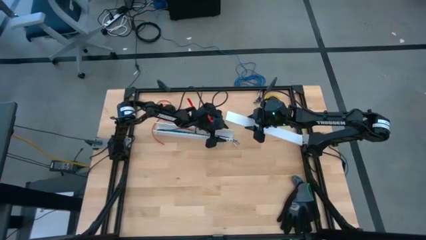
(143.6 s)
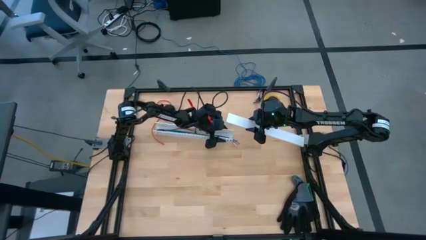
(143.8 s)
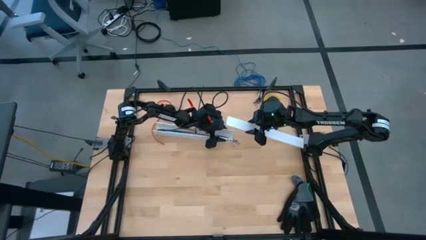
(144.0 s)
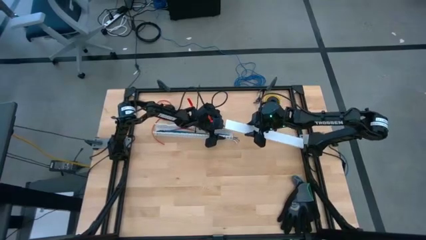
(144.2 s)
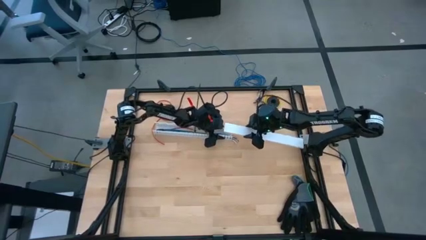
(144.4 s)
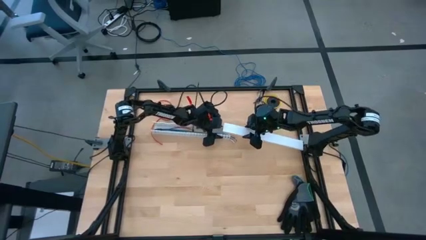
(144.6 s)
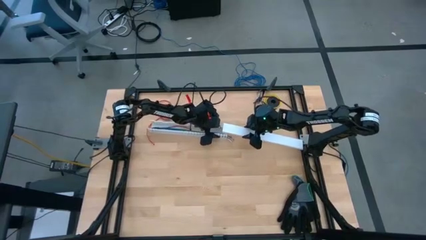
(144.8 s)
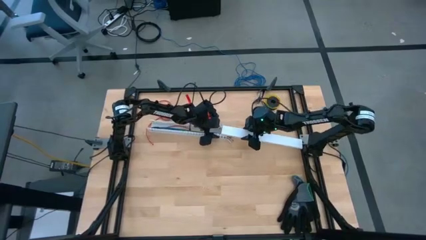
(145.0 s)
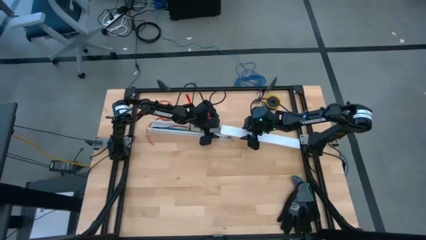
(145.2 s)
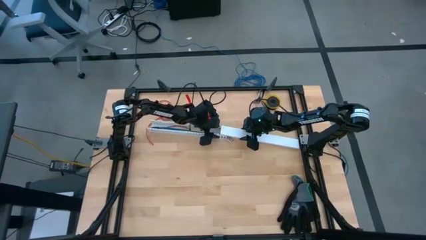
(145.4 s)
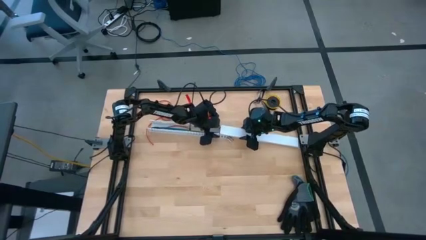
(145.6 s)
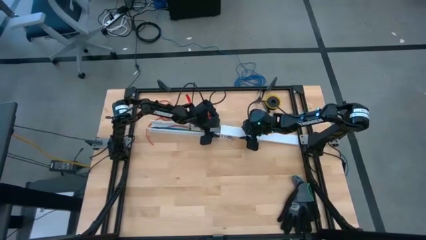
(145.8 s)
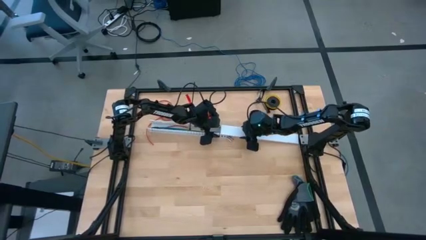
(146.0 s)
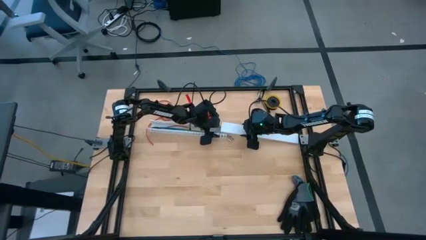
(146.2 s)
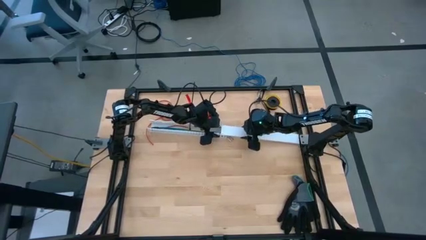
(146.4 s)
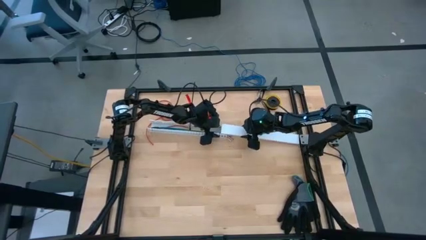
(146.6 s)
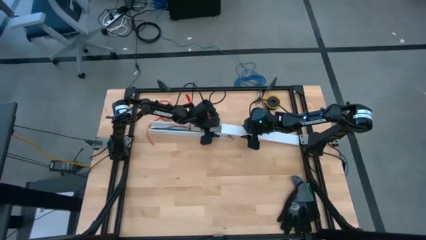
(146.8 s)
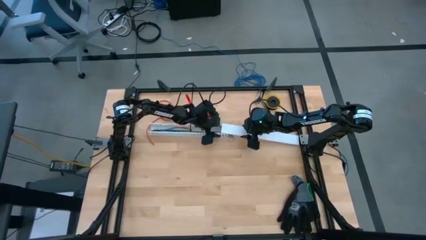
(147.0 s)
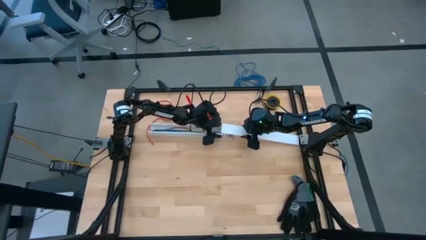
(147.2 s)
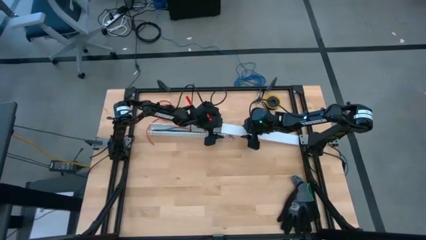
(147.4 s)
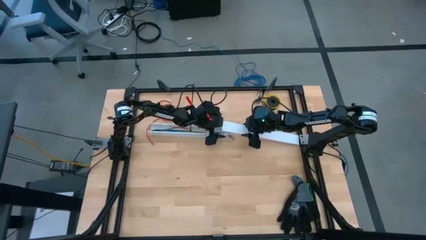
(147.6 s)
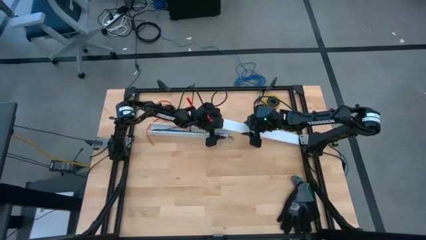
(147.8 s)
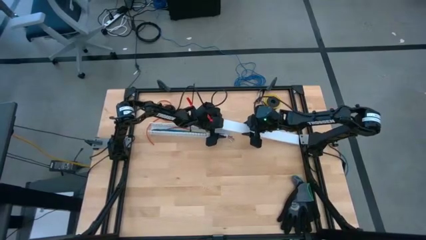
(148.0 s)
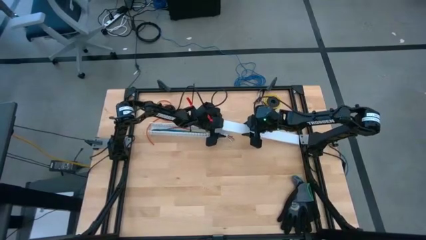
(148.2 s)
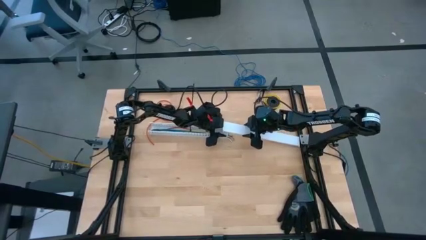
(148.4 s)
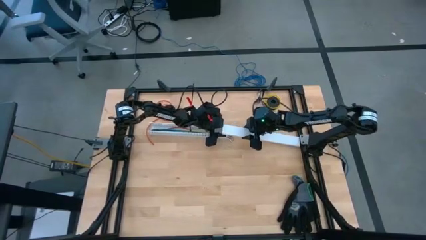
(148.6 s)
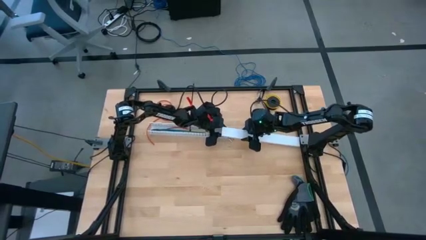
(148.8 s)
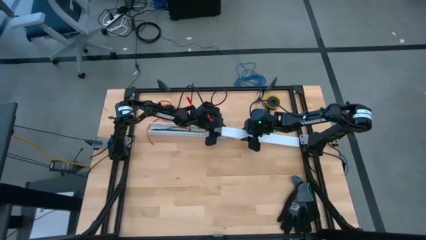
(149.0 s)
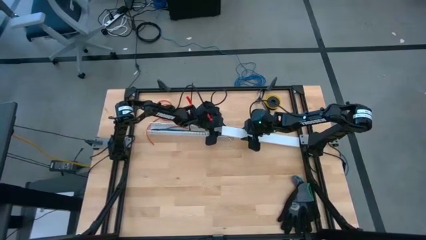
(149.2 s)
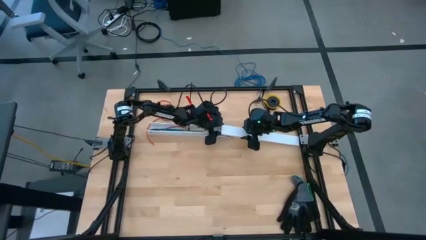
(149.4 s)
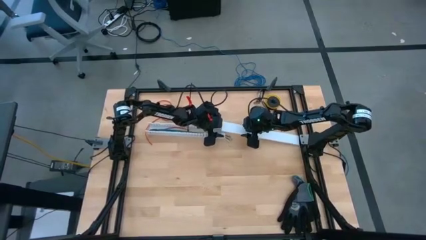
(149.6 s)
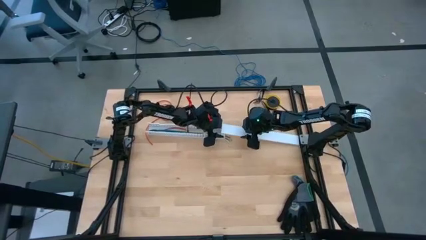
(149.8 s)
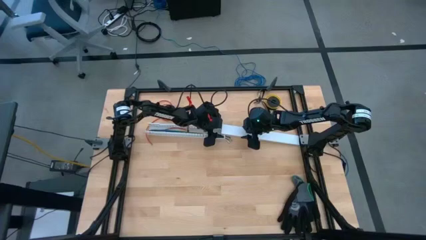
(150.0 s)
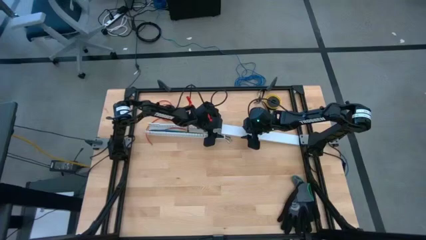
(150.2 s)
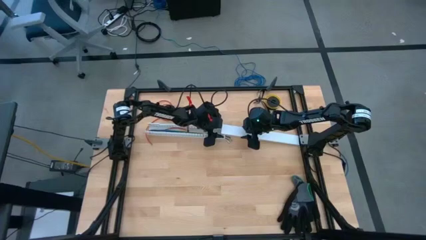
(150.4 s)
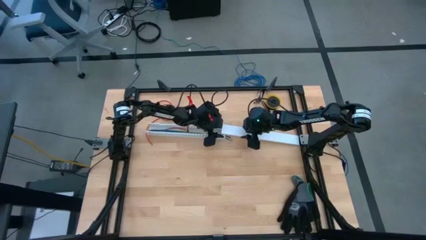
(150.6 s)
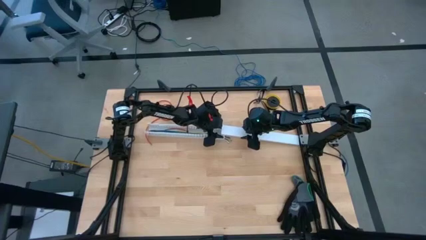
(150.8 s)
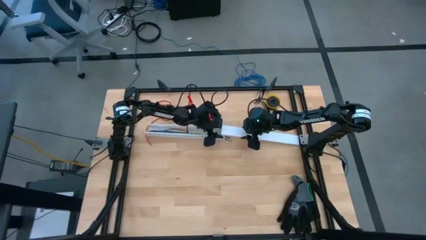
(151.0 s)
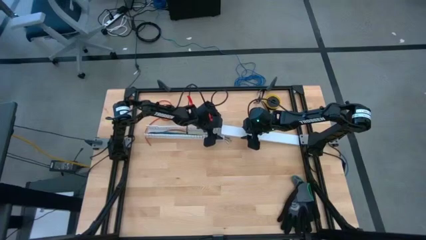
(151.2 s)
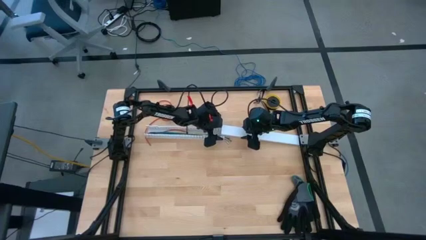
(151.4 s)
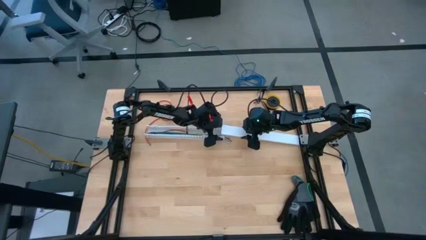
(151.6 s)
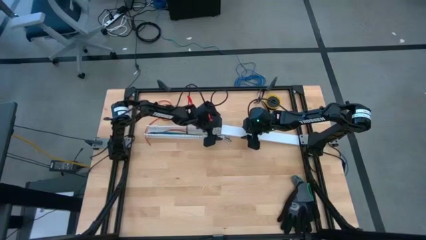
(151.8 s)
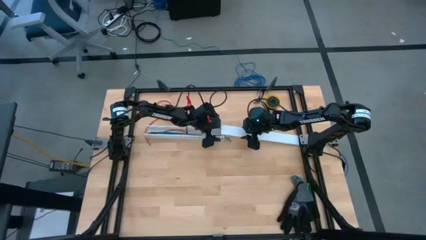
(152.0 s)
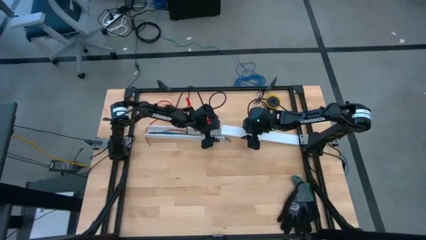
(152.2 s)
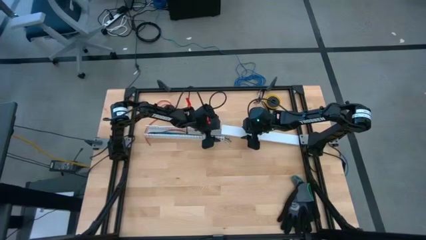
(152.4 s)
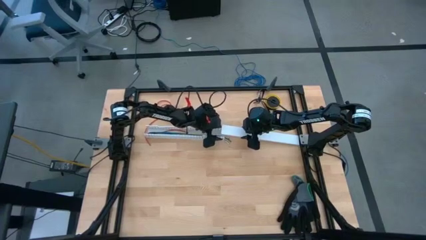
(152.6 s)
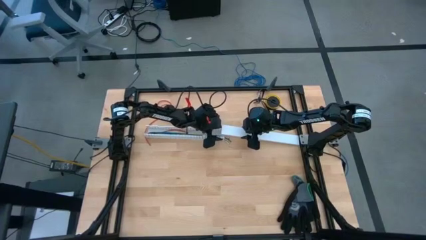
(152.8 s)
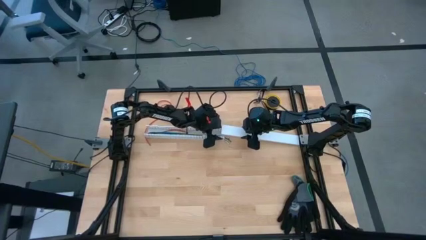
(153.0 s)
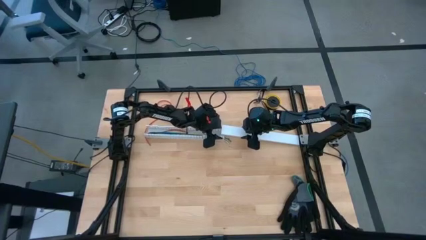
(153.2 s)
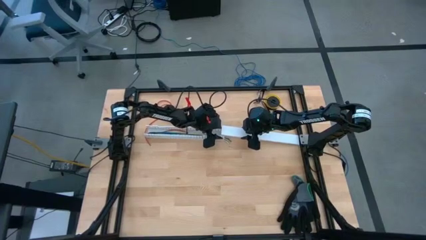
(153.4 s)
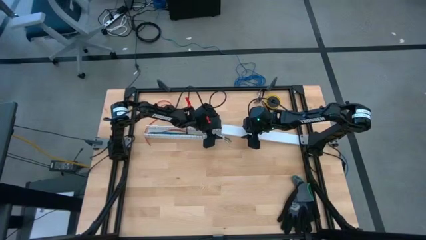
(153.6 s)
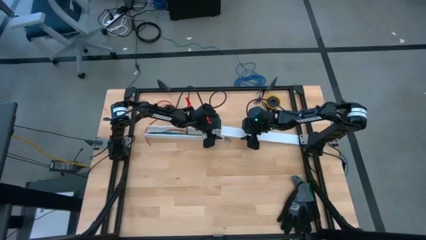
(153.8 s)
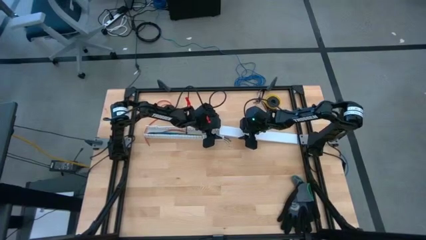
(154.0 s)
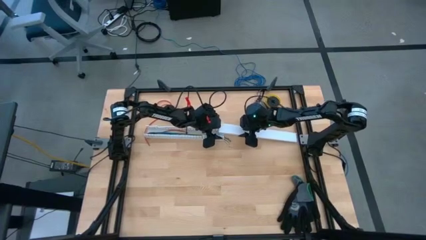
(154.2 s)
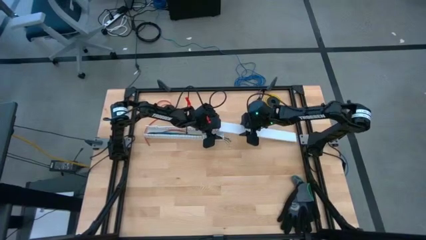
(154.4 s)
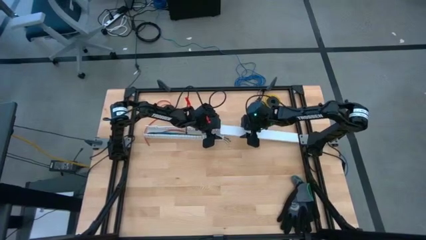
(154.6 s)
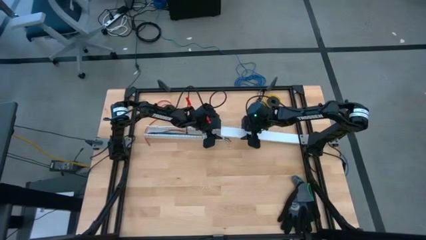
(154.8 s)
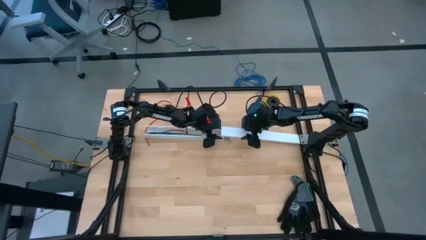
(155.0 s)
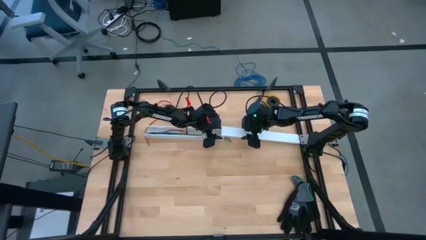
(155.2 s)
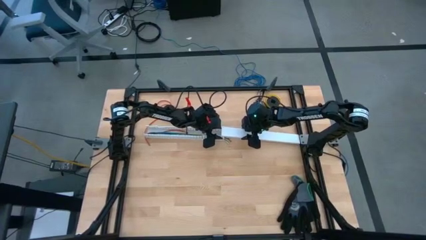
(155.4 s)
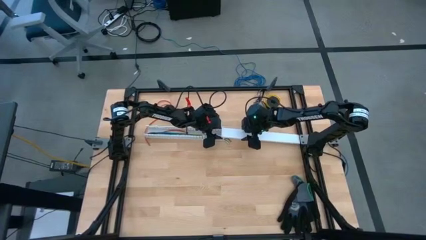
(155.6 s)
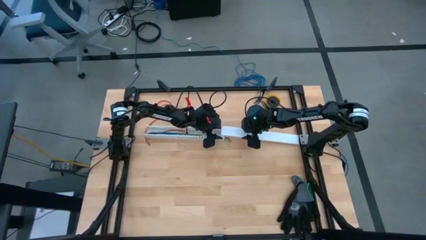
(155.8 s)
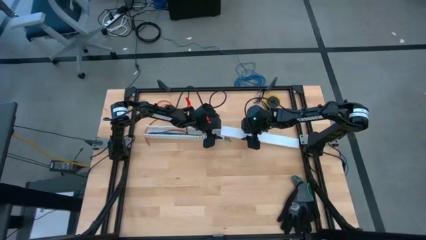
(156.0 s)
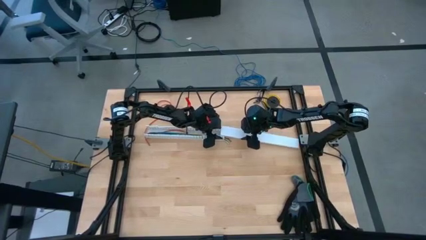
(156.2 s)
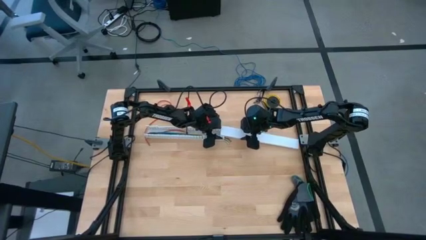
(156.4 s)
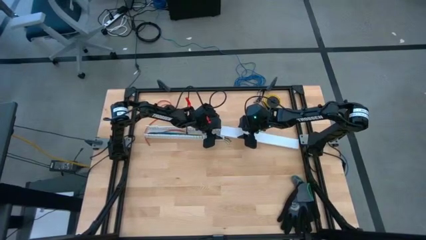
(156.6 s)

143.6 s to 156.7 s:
Task: Ziptie cables
Close the white cable duct

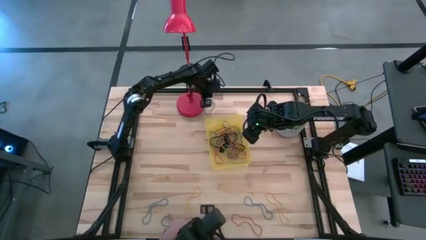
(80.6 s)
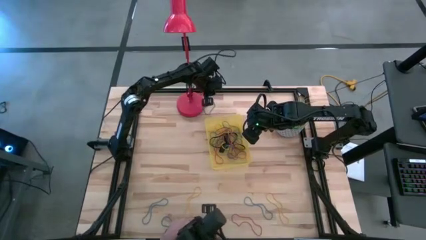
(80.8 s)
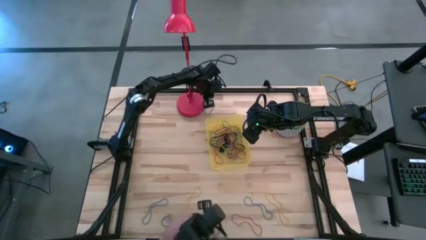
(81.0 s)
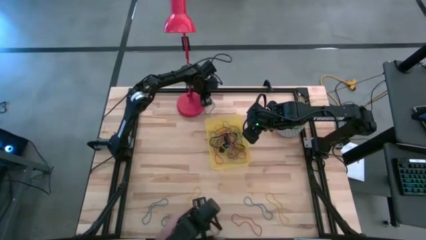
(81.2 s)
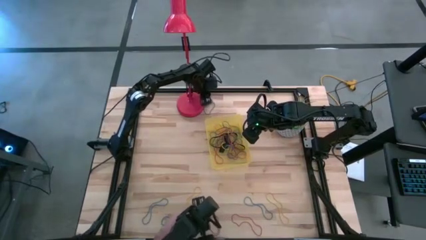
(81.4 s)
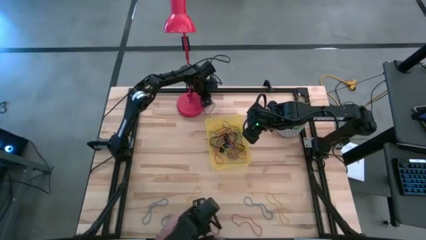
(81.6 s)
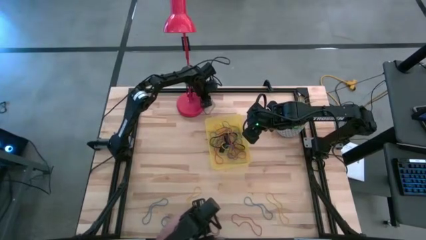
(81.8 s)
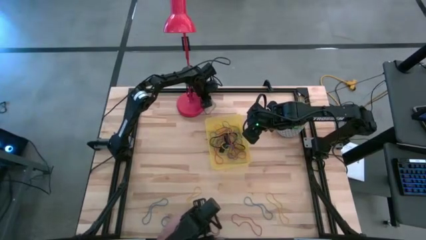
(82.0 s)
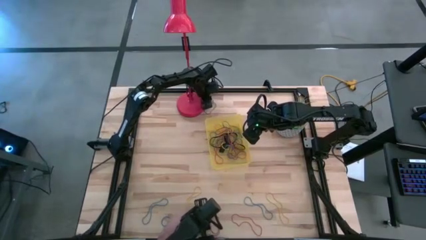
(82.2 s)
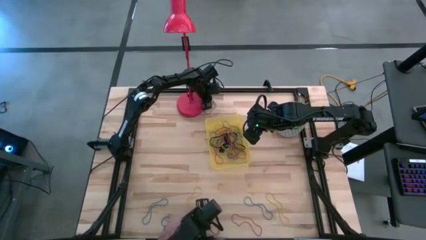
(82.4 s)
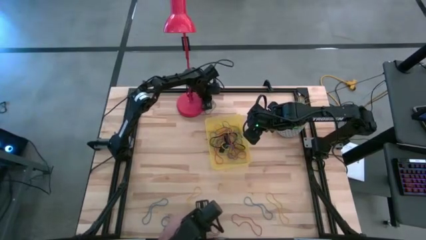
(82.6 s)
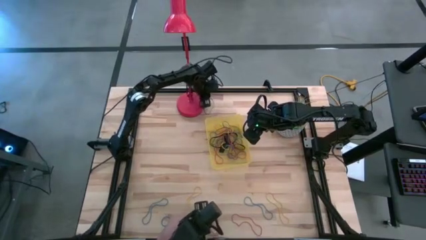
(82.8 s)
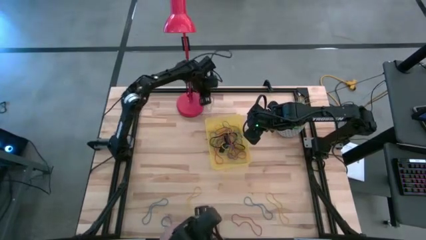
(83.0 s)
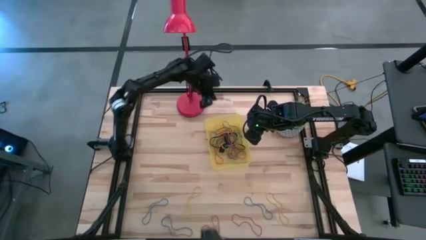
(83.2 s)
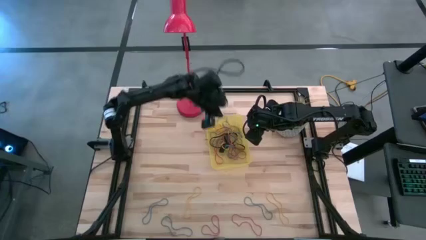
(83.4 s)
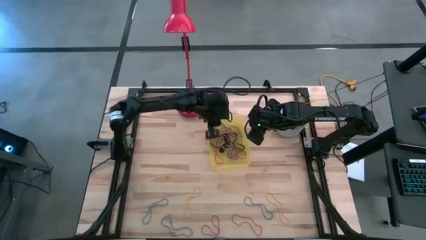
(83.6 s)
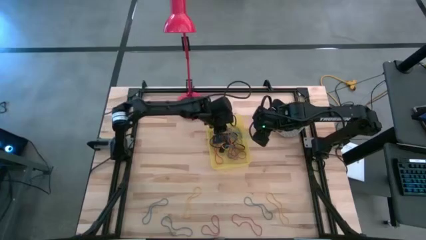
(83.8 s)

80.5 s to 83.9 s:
Task: Pick and place rubber bands into bin
Put the blue rubber band into the yellow bin
